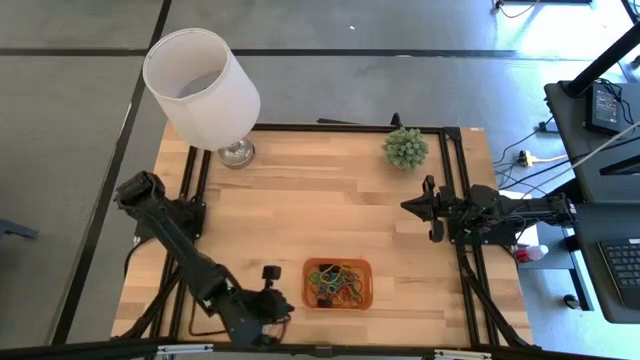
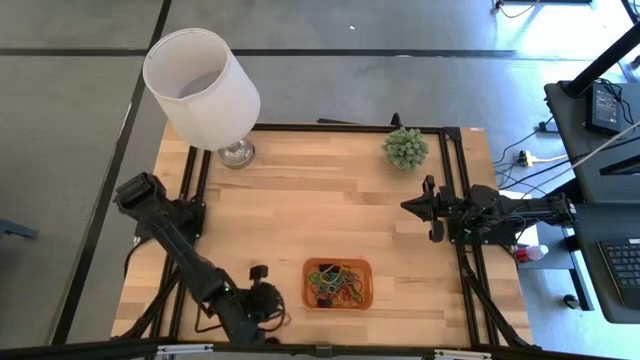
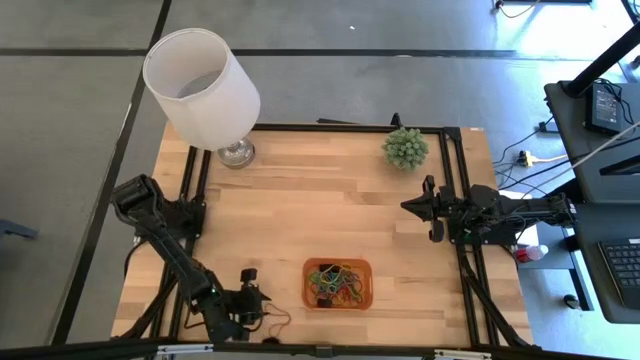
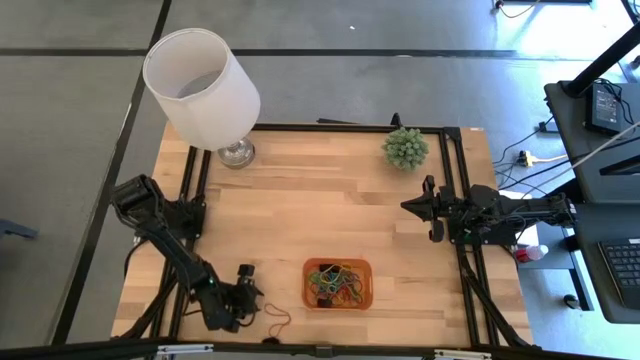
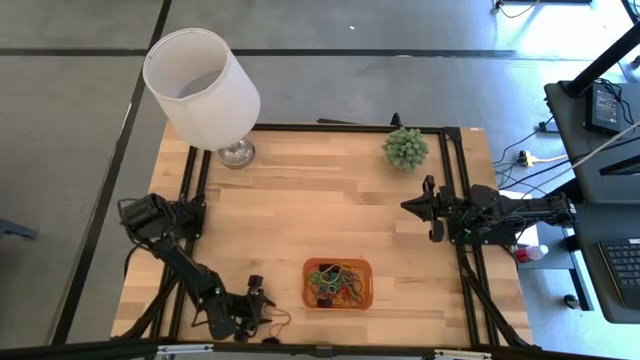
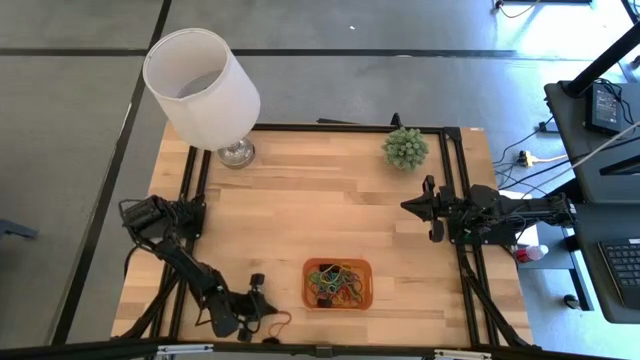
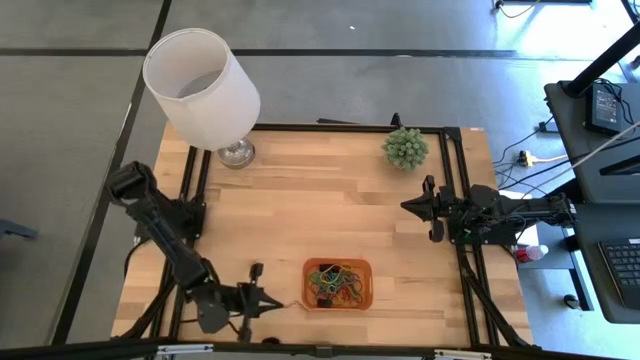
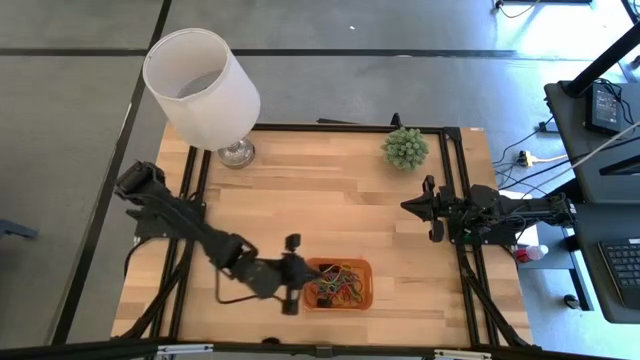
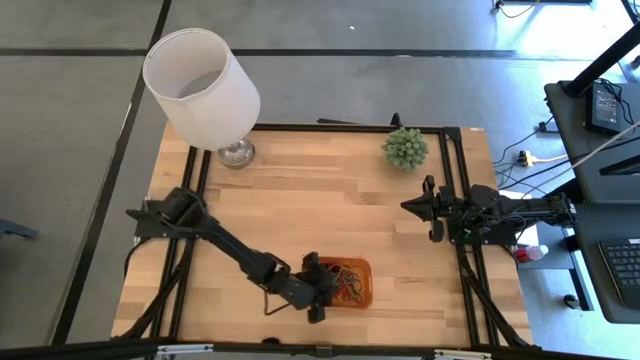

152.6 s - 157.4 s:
Task: Pick and place rubber bands into bin
Put the red rubber band into the orange bin

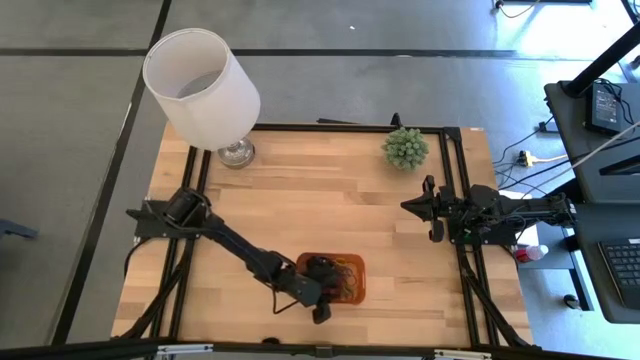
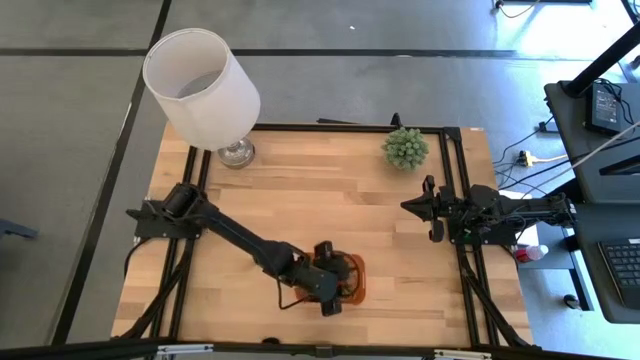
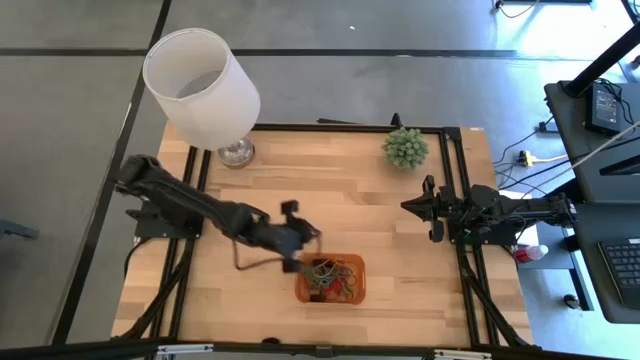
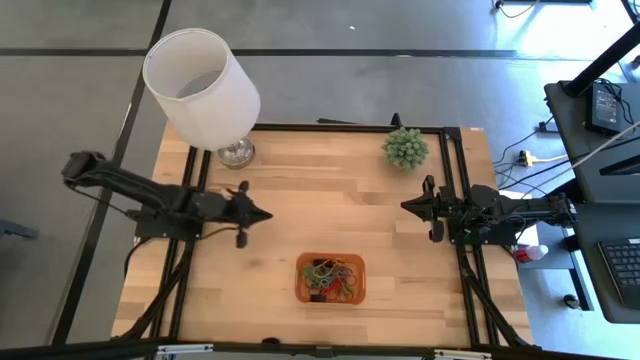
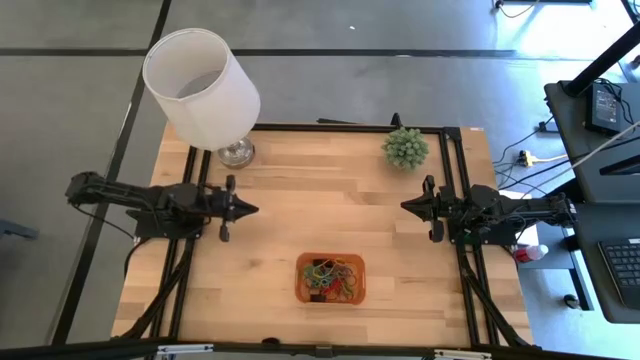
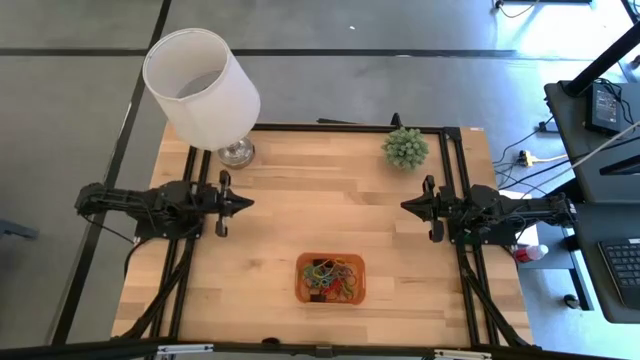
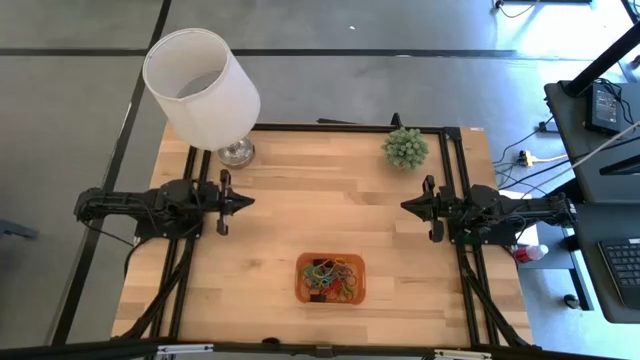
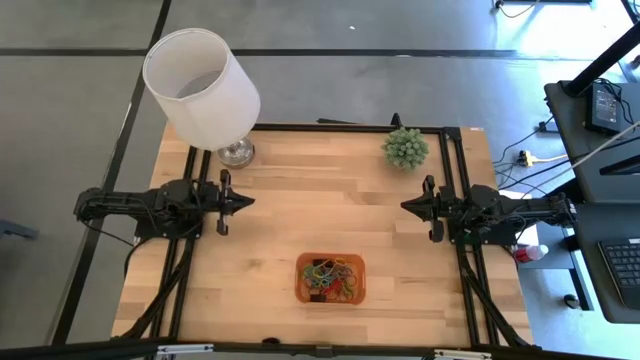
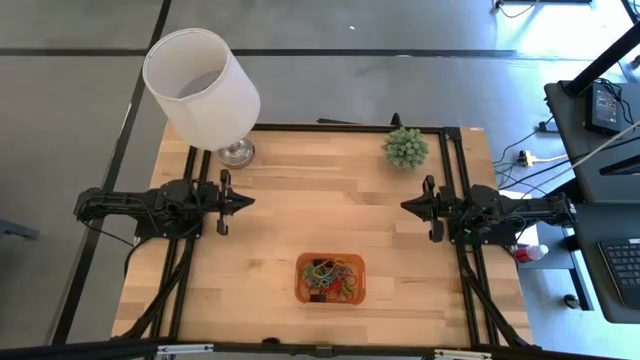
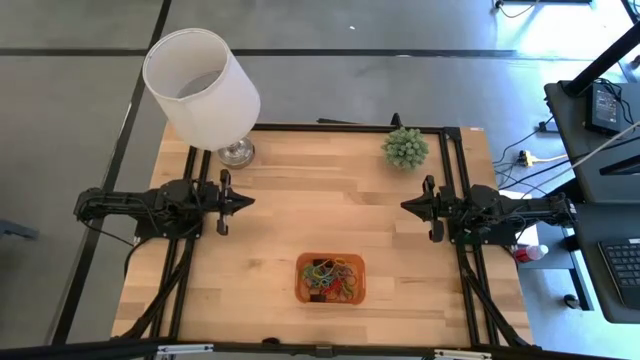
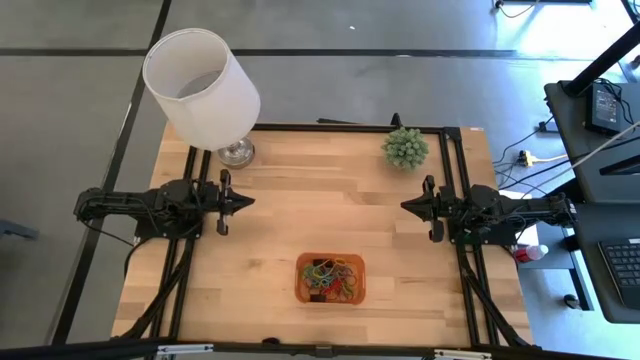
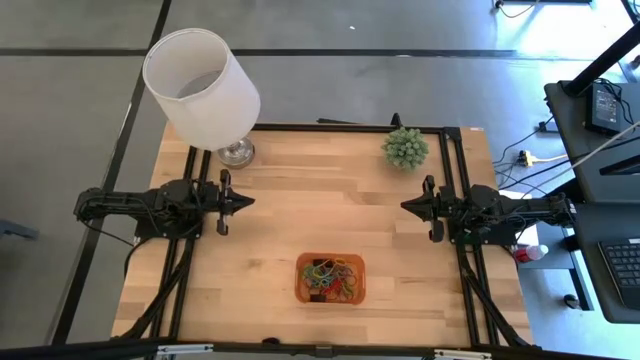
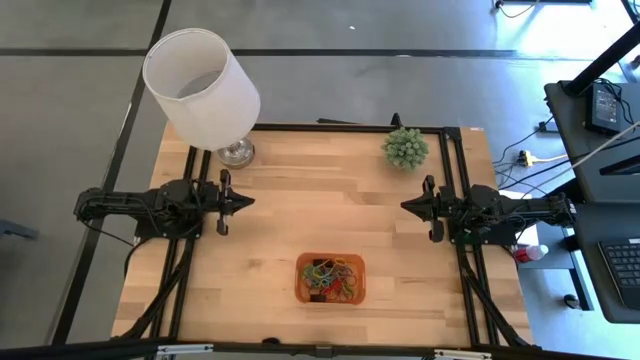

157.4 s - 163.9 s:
Return to Home Position

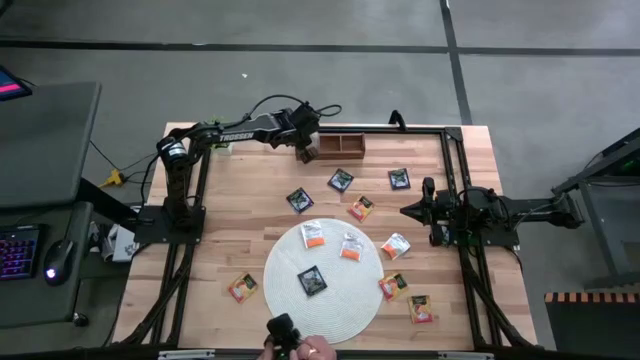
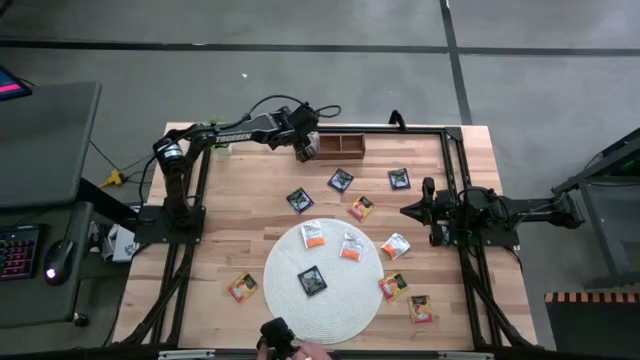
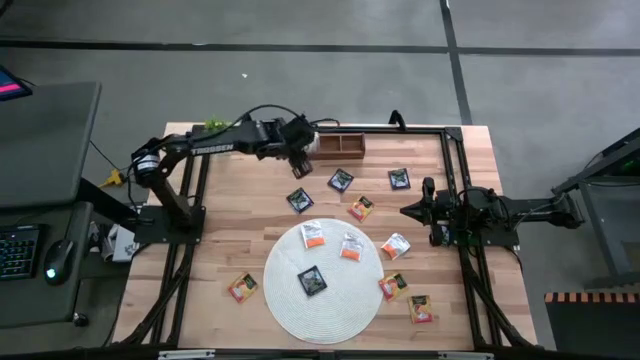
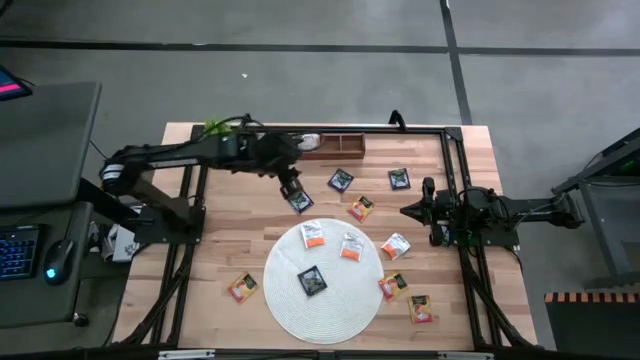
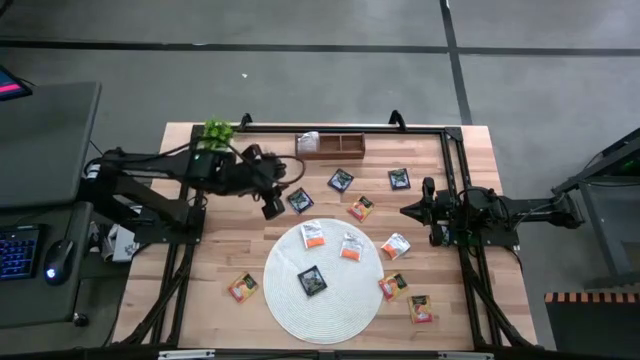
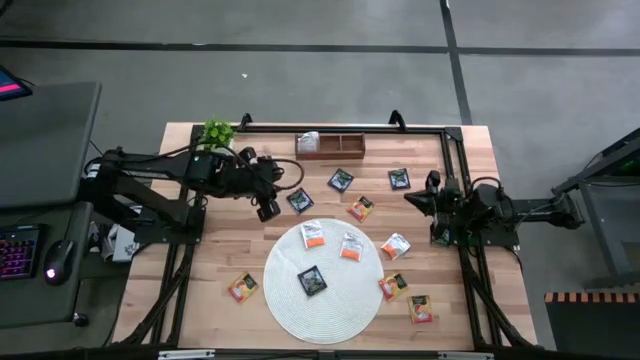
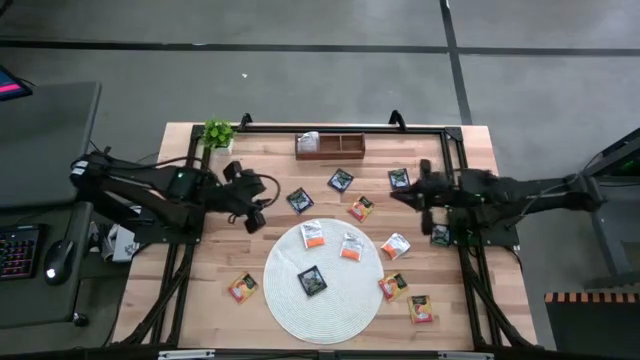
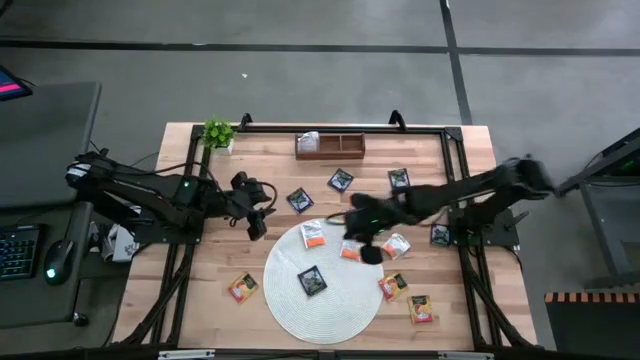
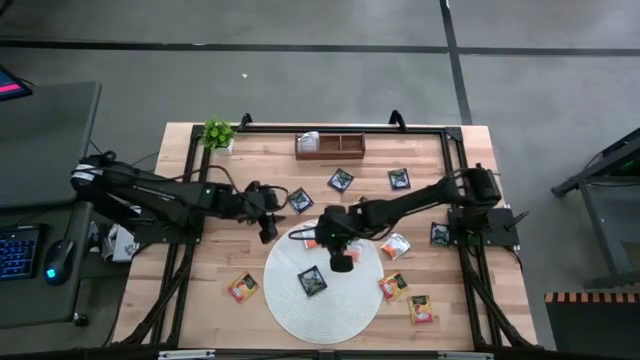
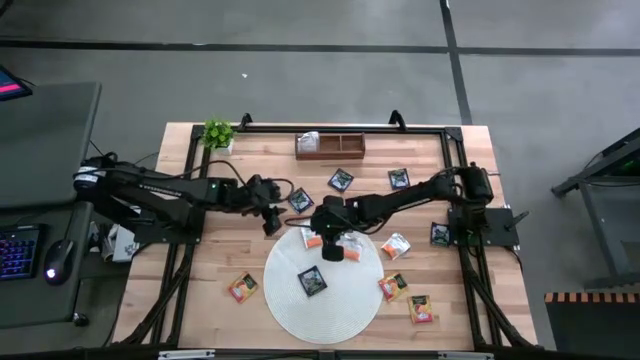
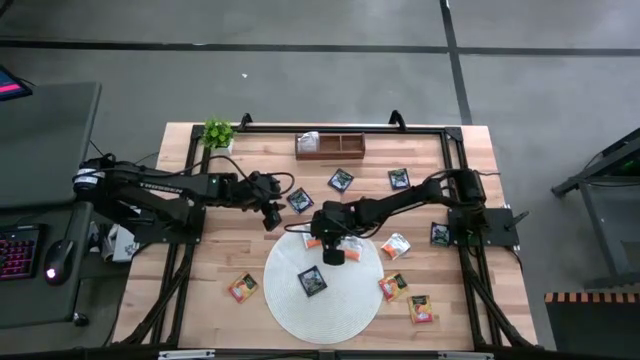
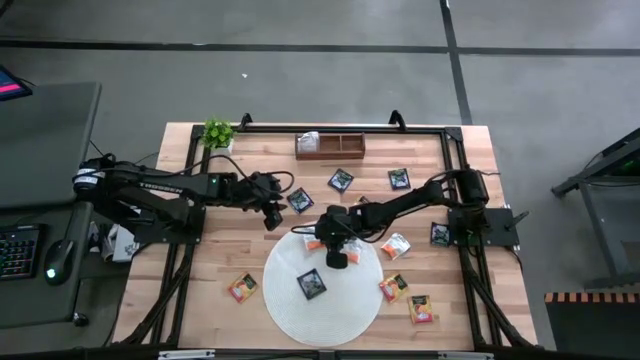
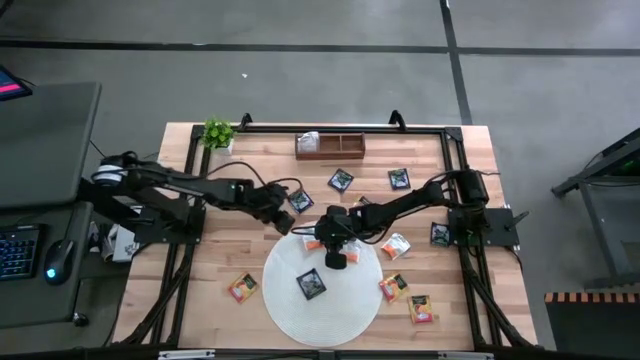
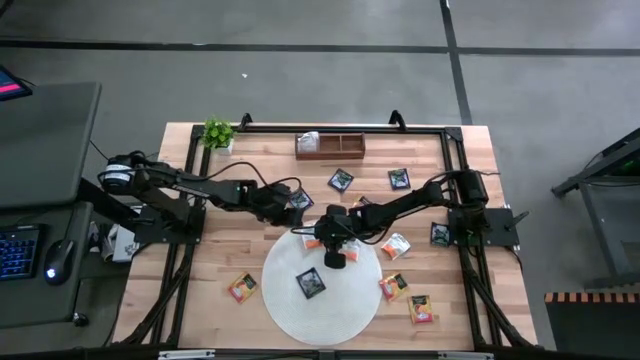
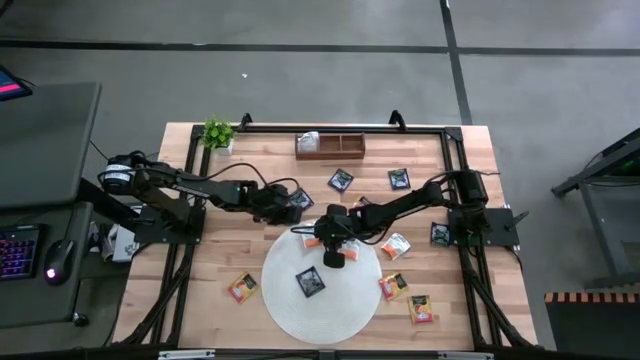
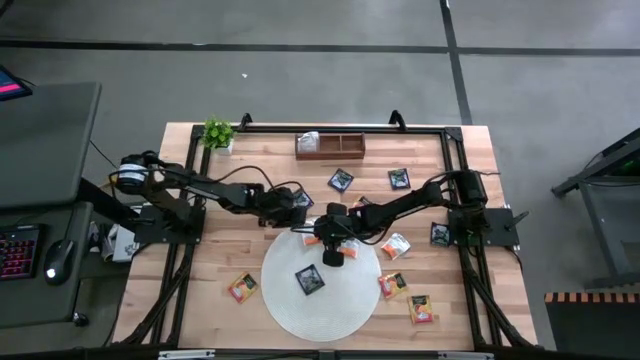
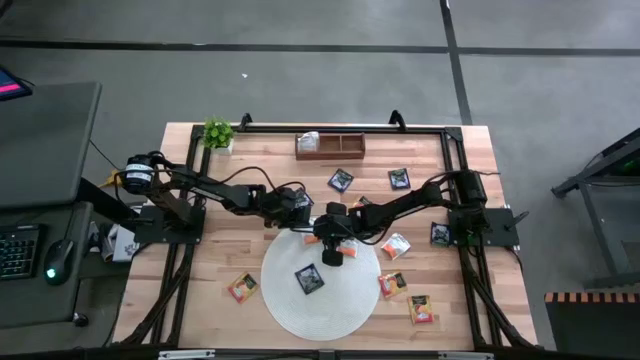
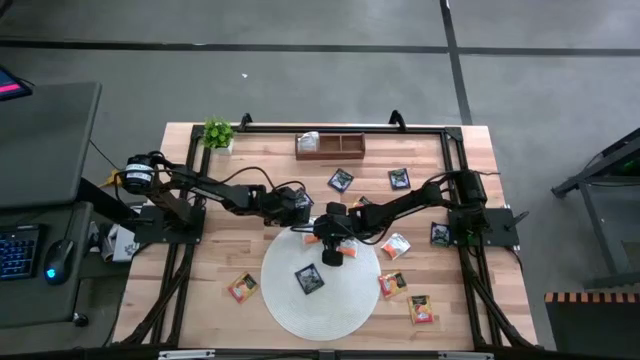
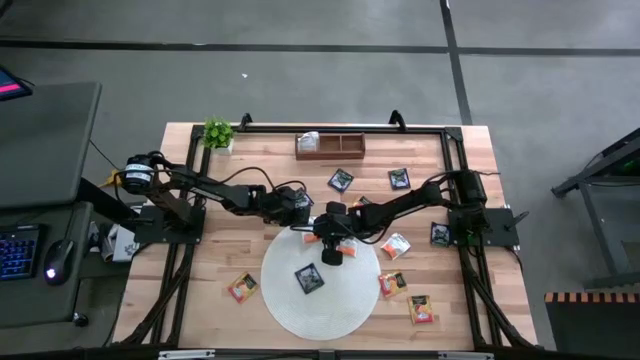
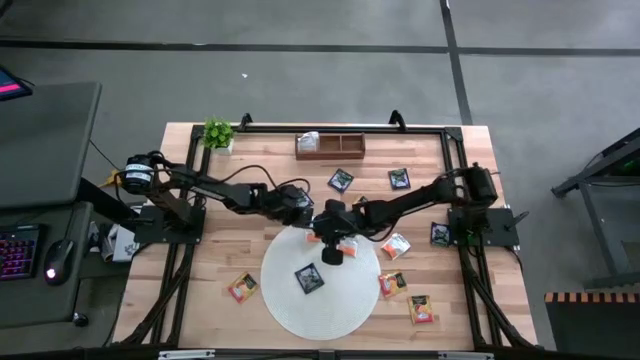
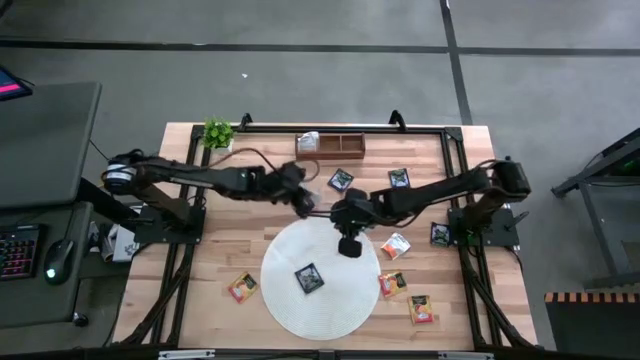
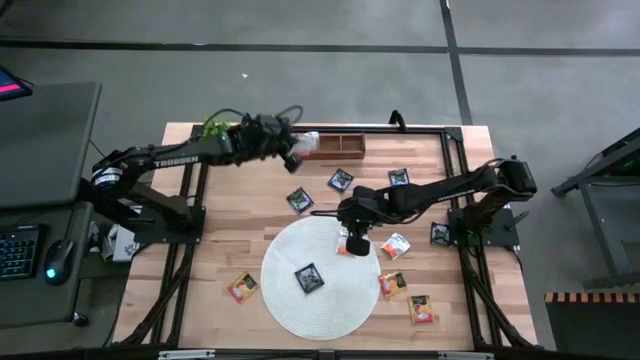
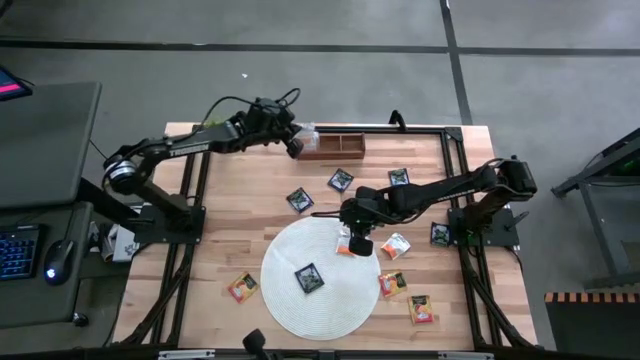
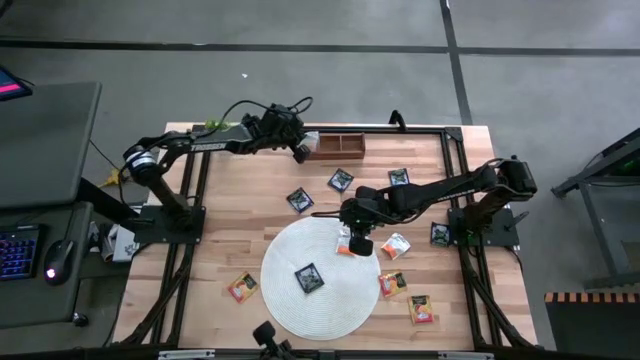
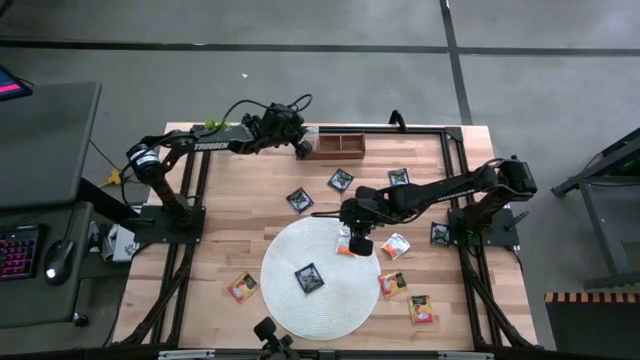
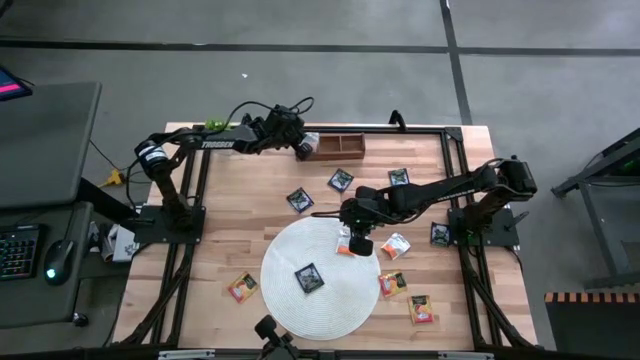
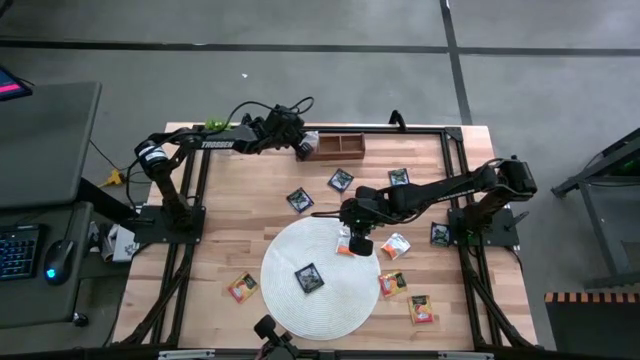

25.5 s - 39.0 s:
Task: Pick & Place Tea
Put the white tea bag into the left section of the wooden organizer
